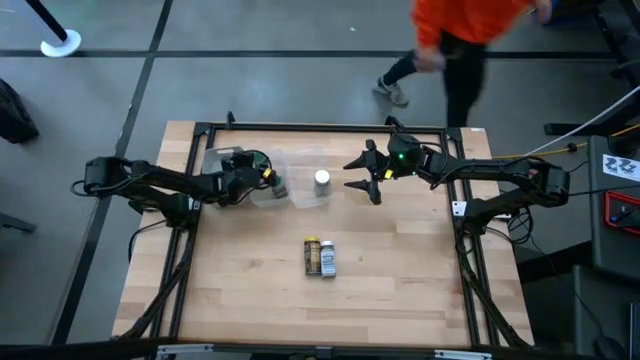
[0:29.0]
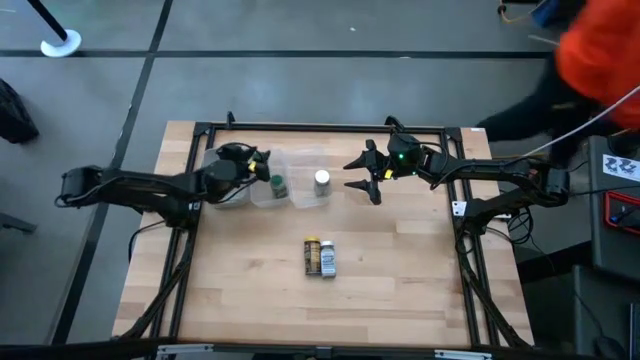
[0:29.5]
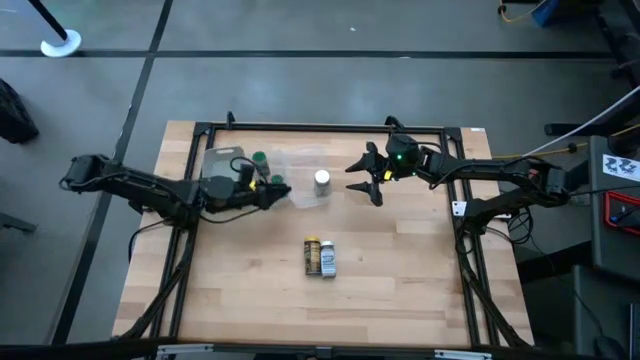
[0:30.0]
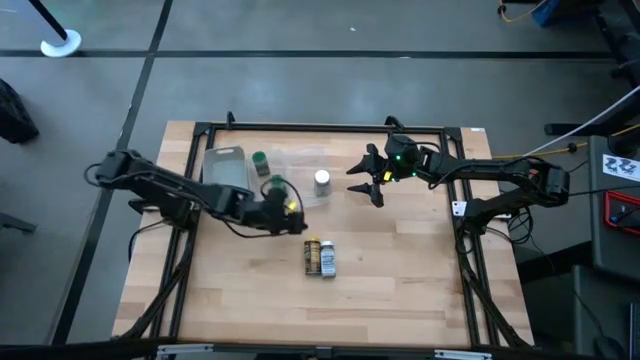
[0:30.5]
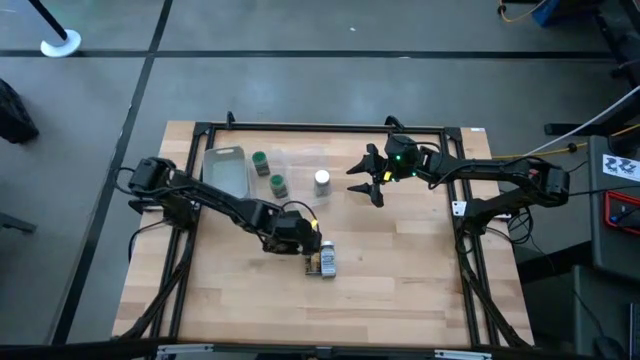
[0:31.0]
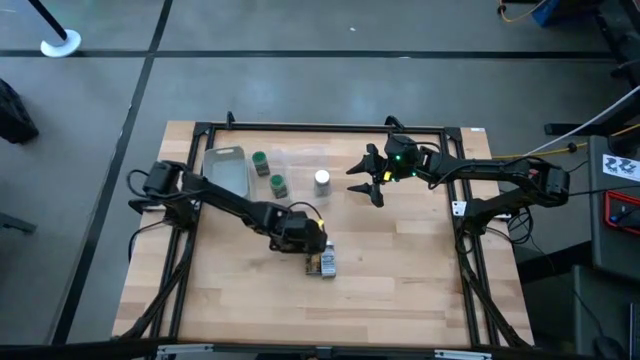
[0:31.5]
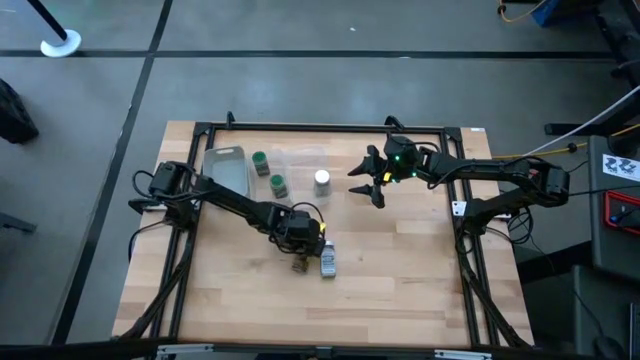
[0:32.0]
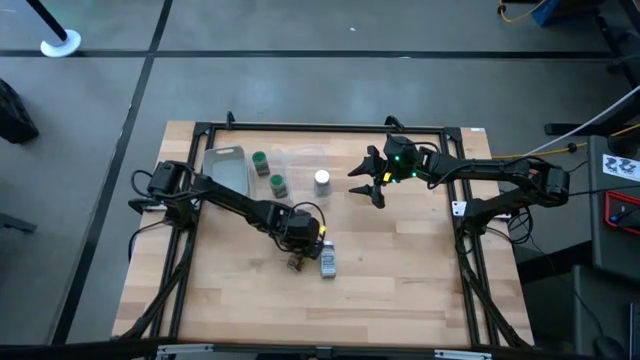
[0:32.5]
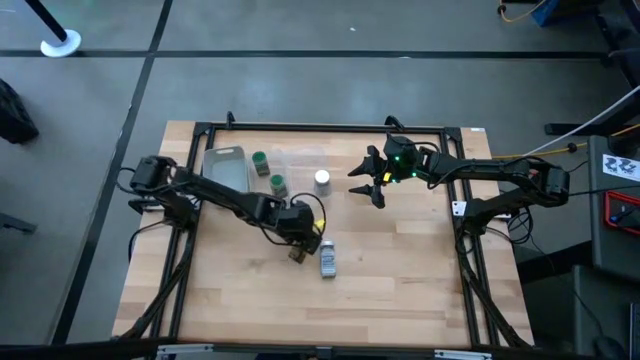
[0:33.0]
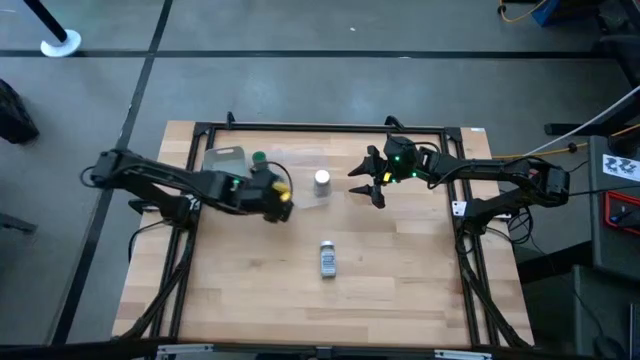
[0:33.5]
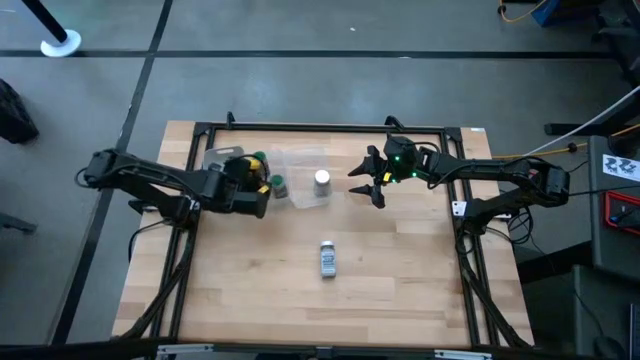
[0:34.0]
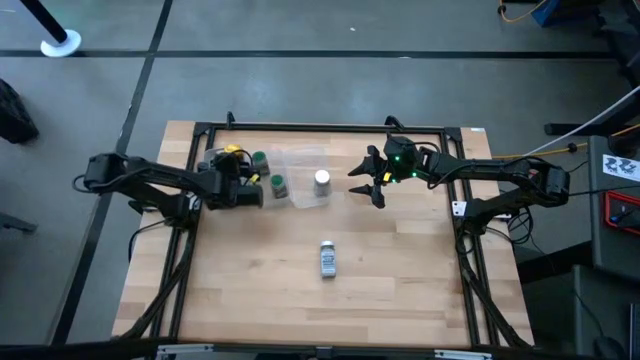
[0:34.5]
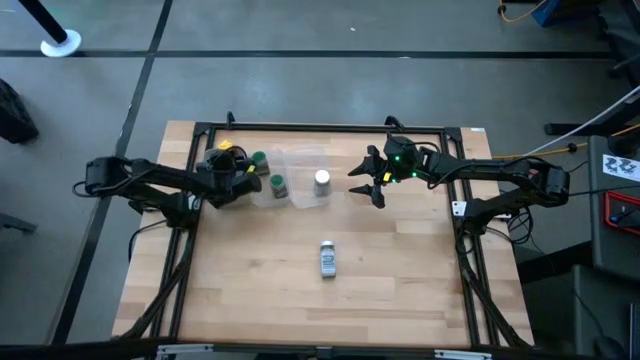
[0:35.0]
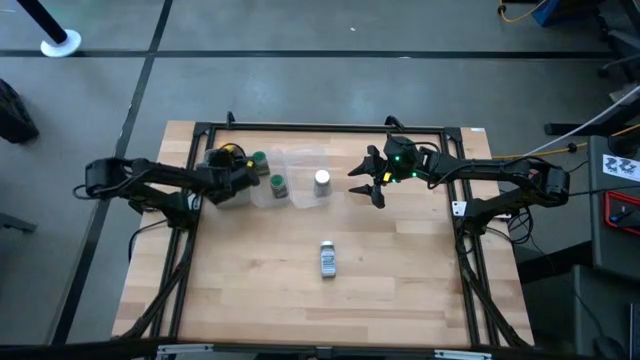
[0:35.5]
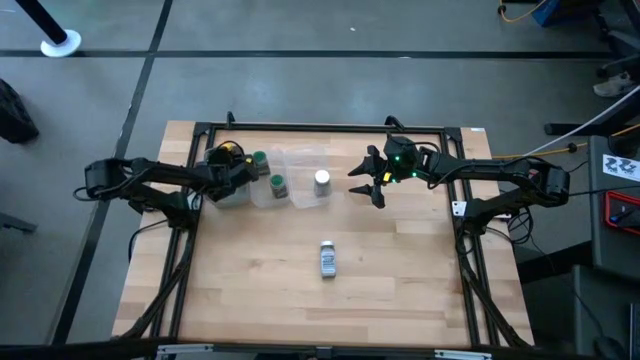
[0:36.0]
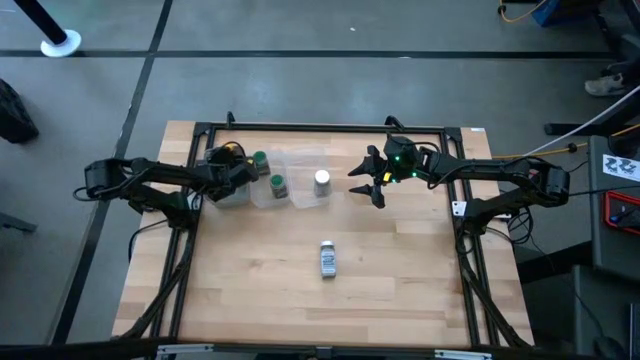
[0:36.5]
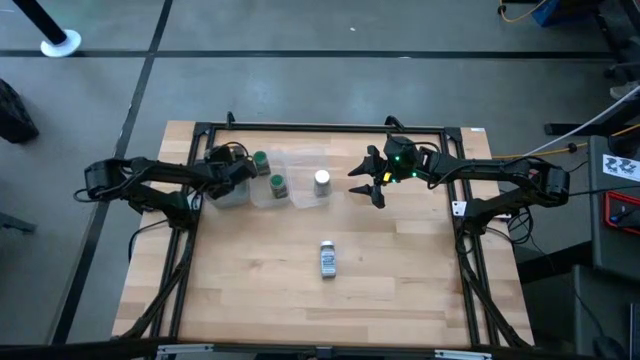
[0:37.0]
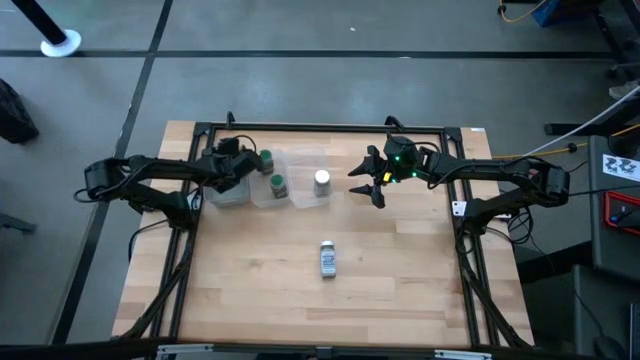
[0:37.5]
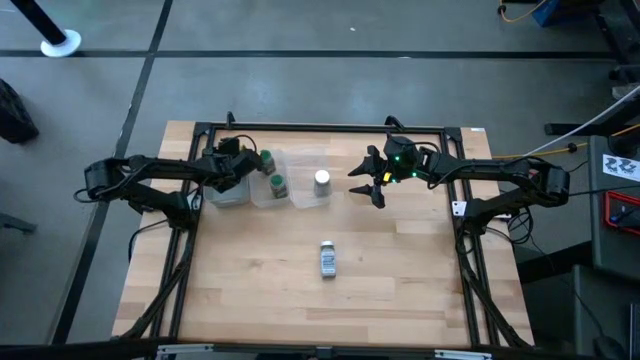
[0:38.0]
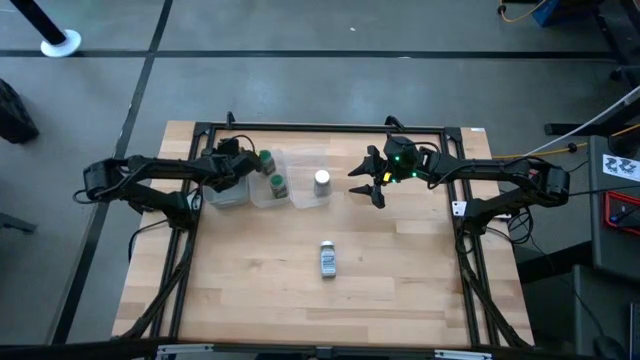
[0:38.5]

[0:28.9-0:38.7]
Task: Sort spices by type
Put the yellow seasoning bottle into the gray bin

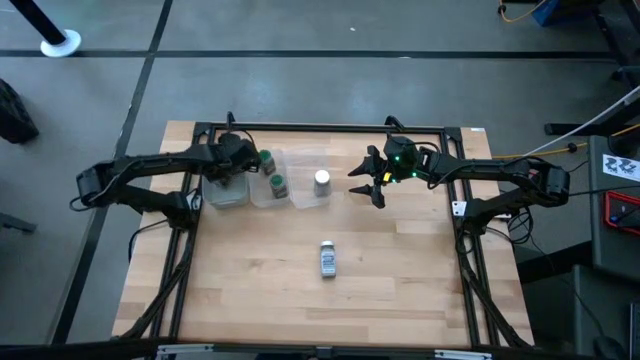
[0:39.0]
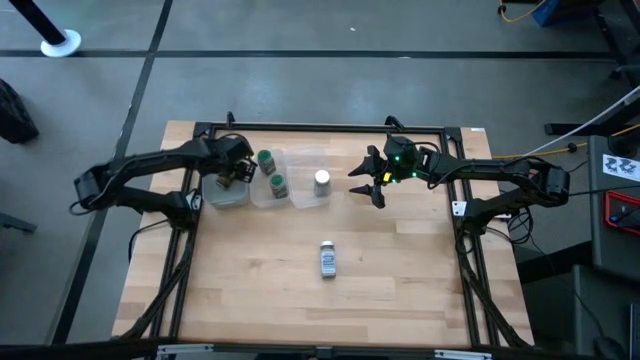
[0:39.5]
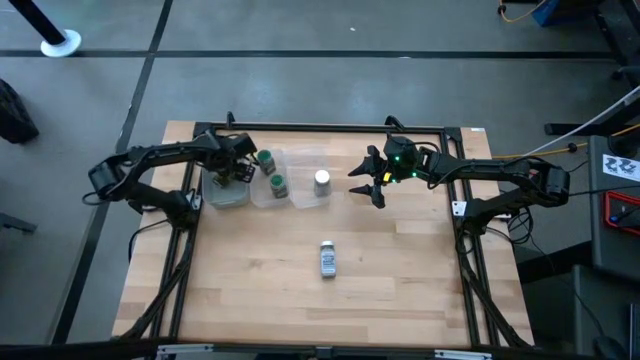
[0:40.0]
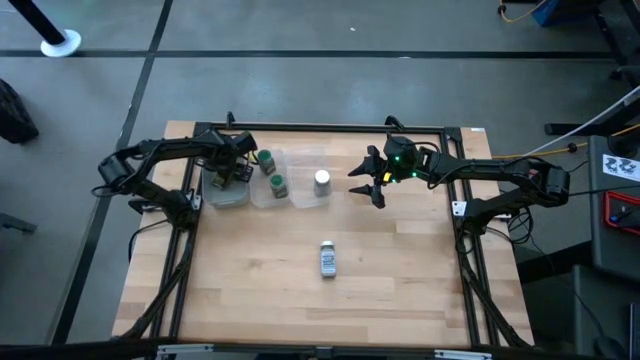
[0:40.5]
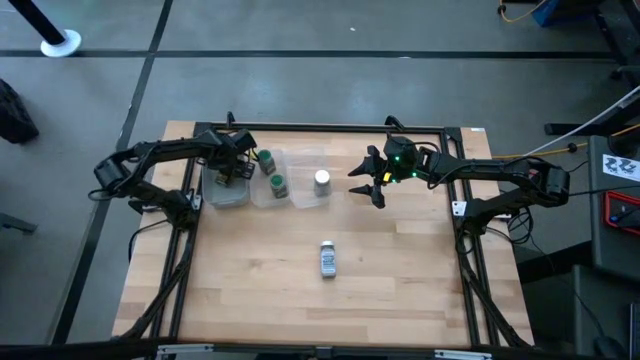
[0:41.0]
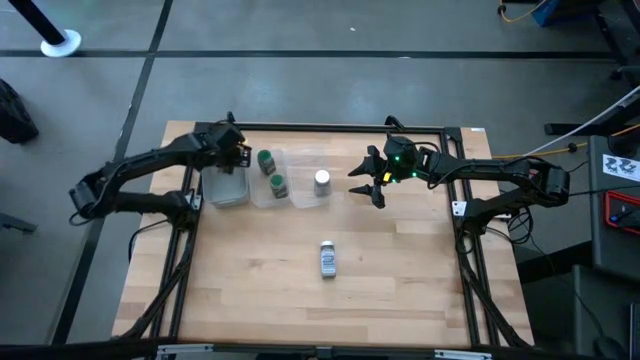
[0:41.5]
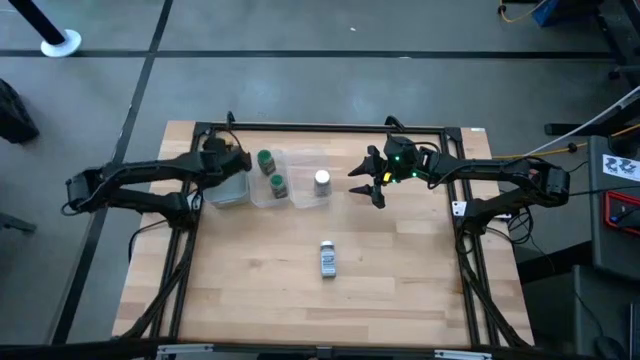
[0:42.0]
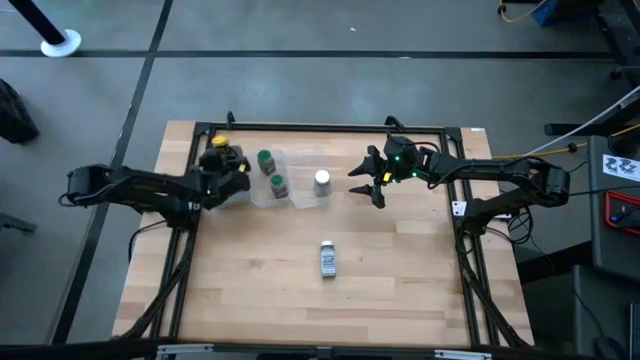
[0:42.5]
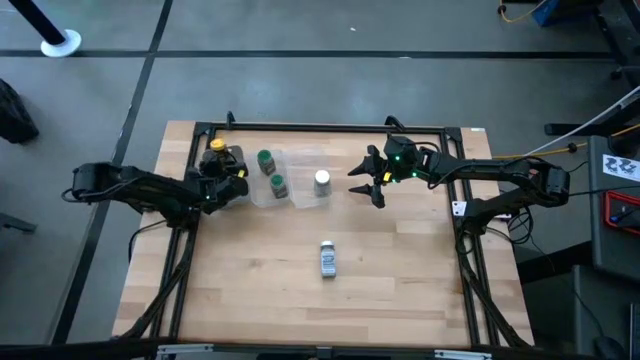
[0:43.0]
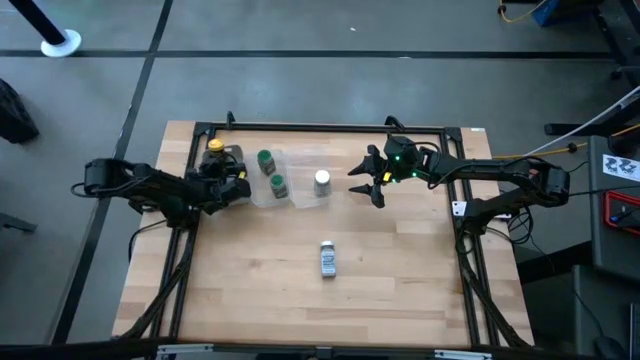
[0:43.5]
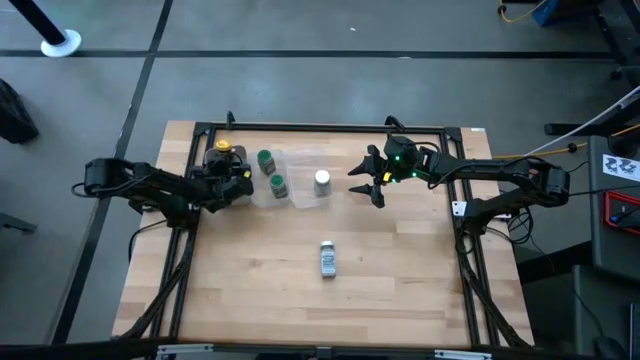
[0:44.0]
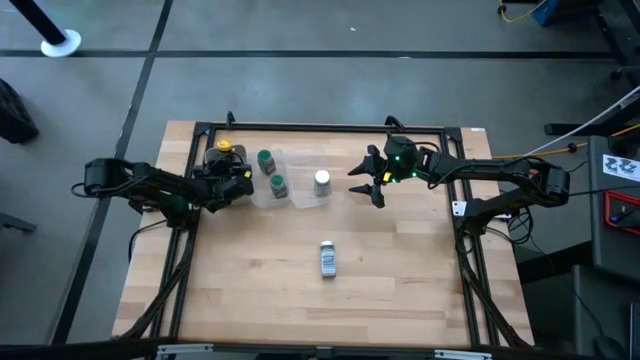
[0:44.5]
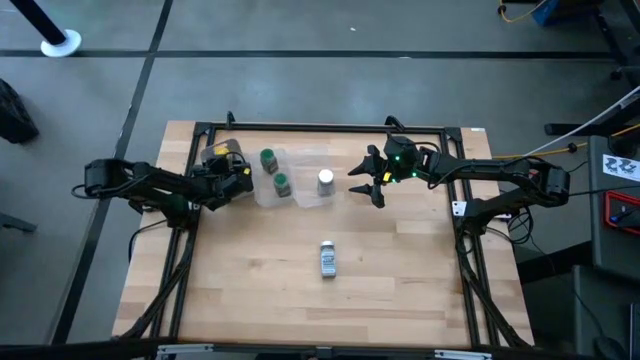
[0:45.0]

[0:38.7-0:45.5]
Put the yellow seasoning bottle into the gray bin

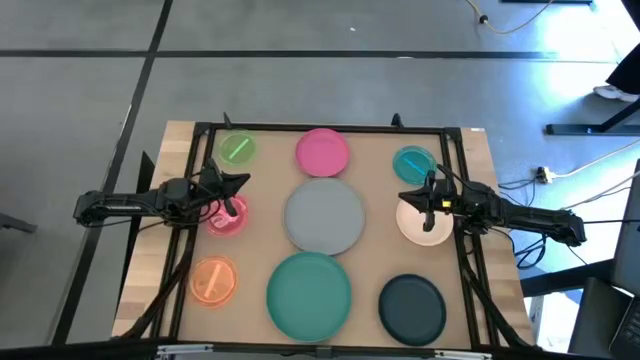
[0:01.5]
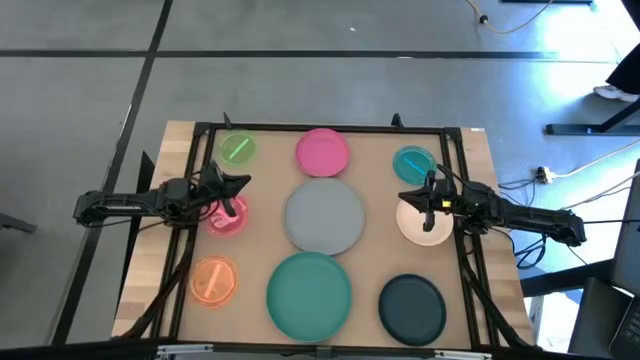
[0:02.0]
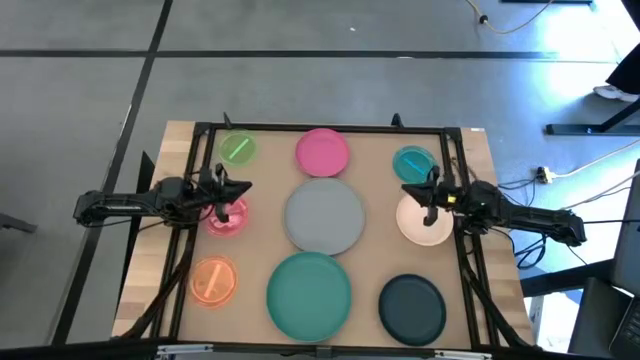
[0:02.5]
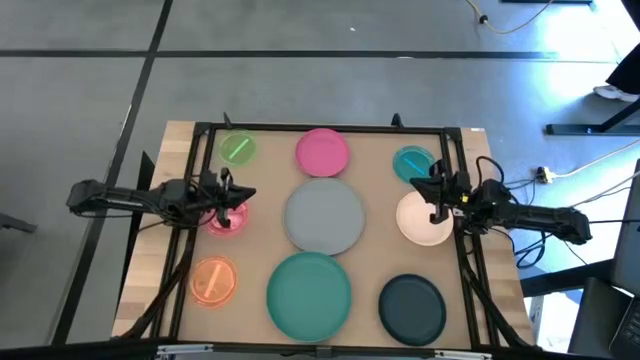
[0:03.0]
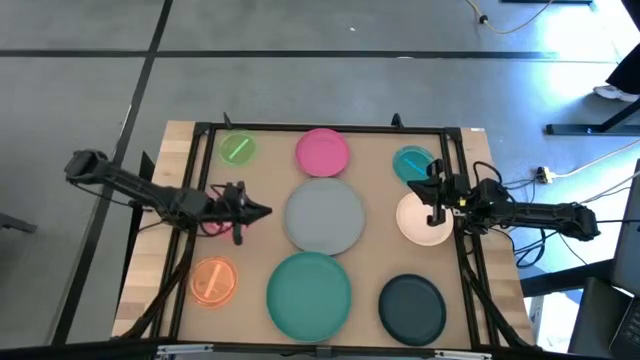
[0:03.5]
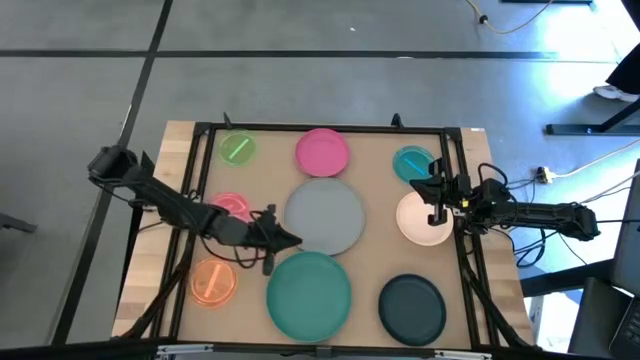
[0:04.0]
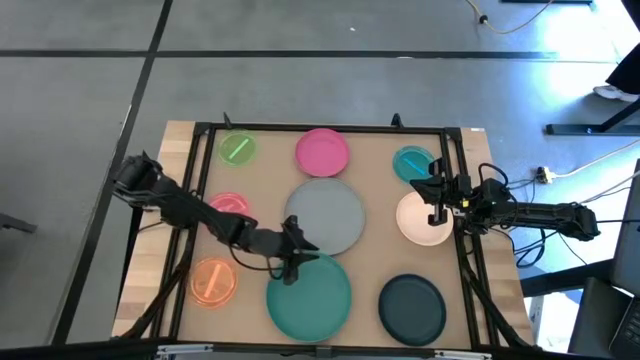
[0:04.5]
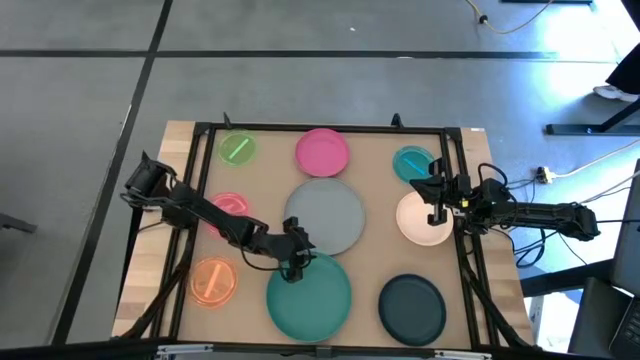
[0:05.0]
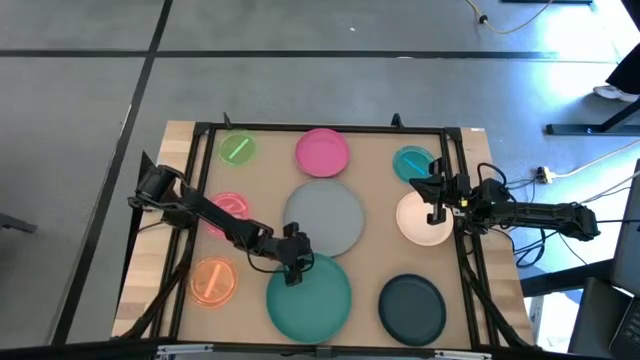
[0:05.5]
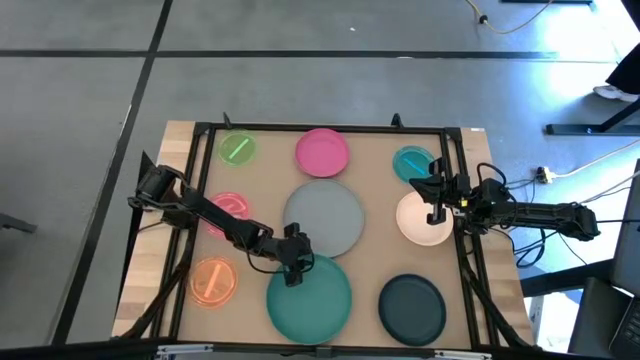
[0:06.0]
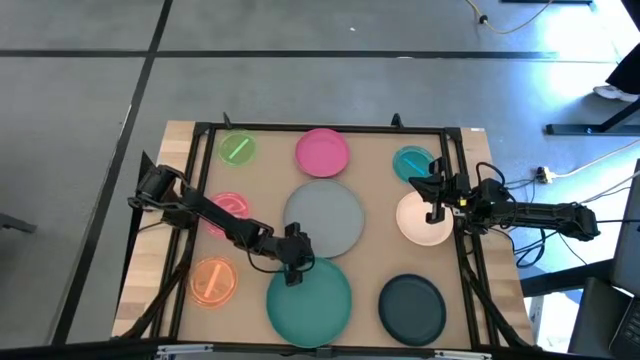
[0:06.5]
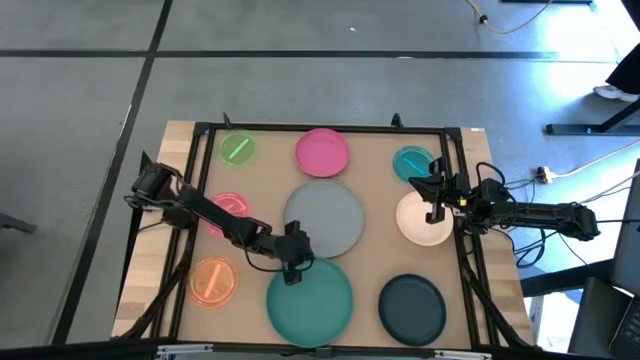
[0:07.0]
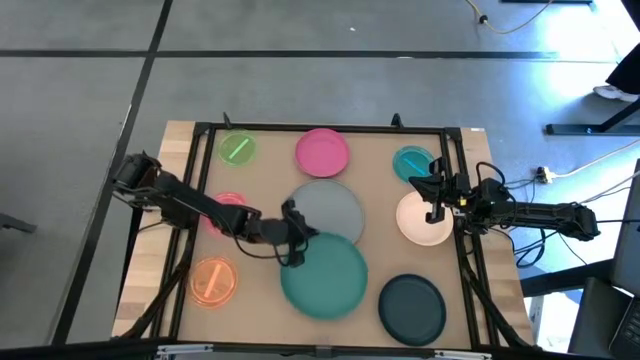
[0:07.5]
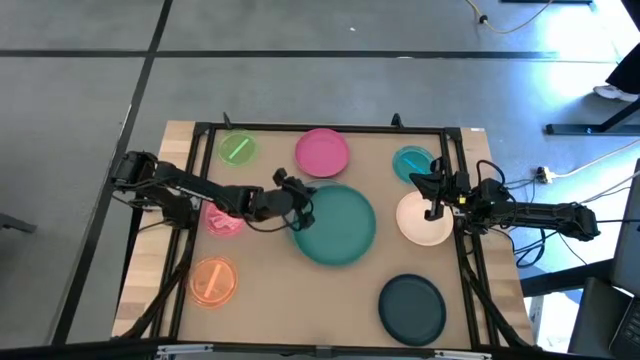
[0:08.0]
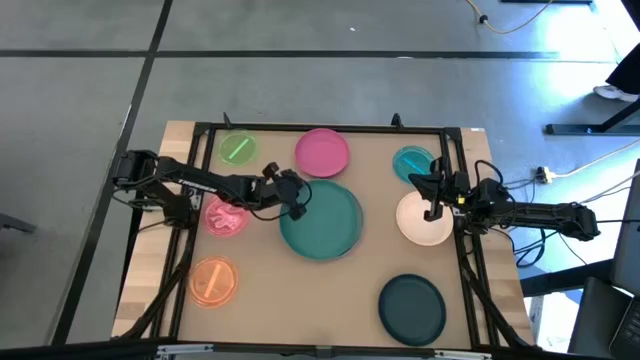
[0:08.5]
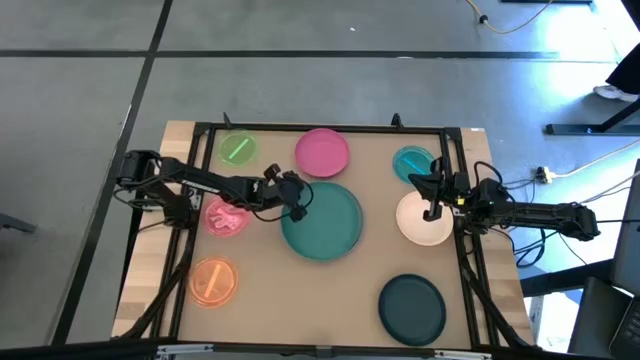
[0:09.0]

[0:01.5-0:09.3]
Task: Stack plastic plates
Stack the blue plate on top of the gray plate
